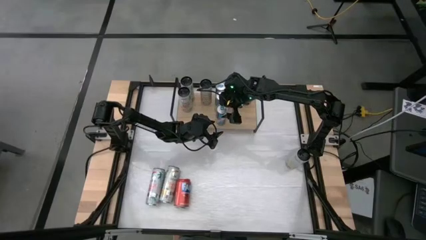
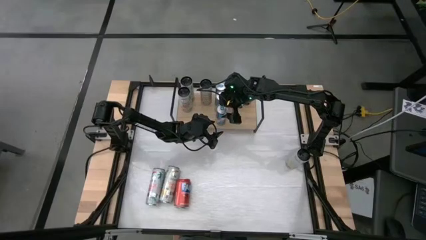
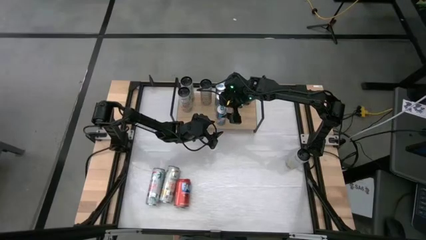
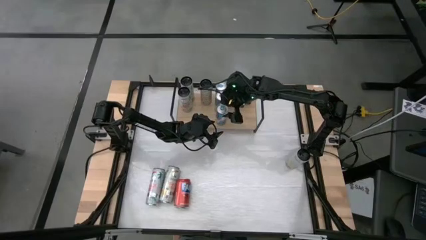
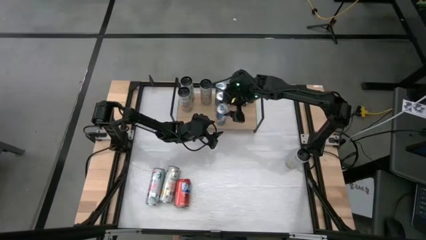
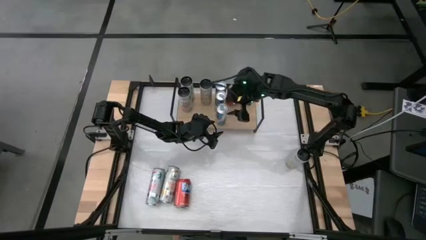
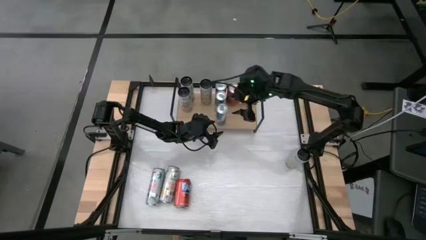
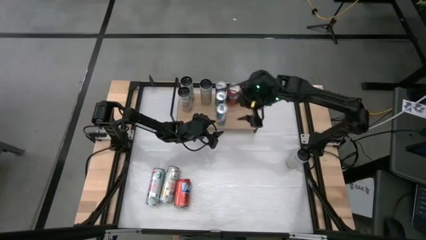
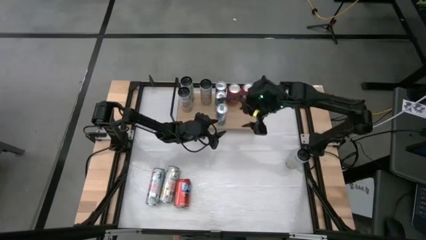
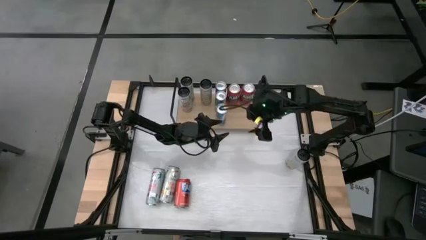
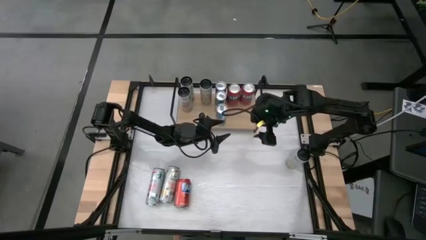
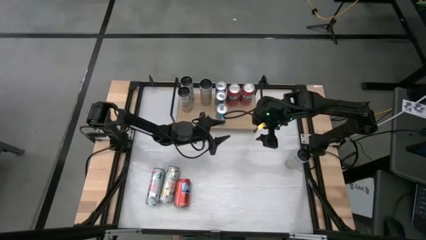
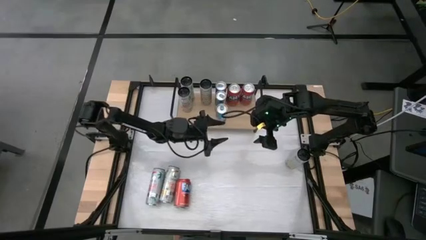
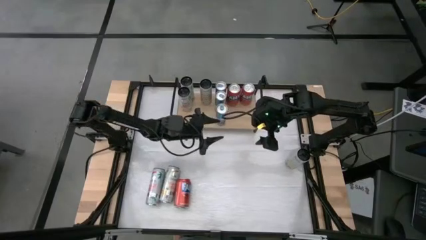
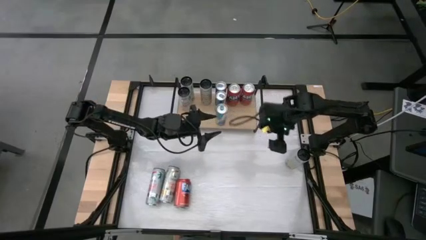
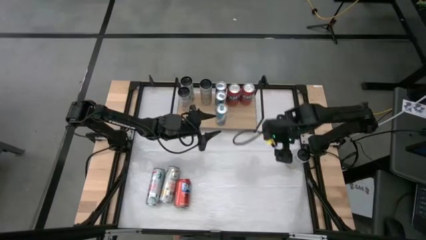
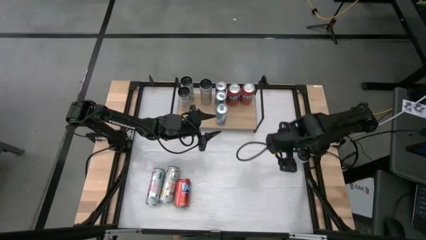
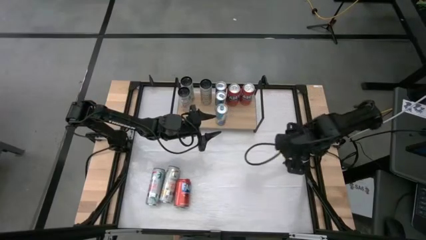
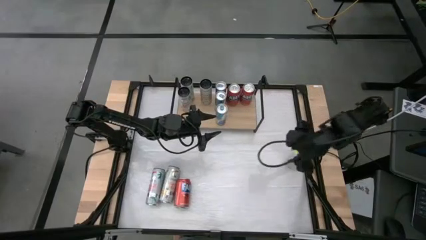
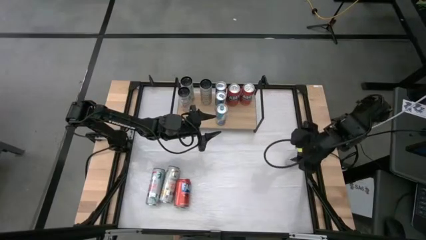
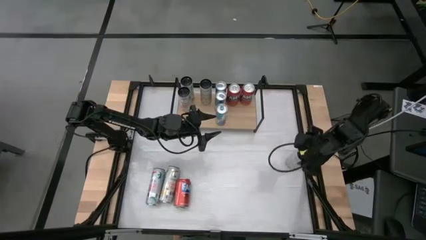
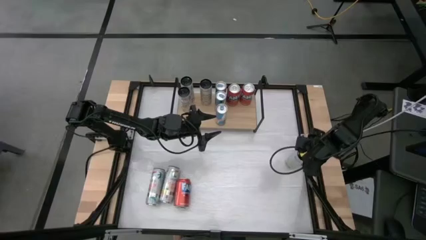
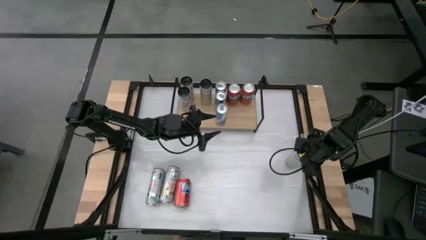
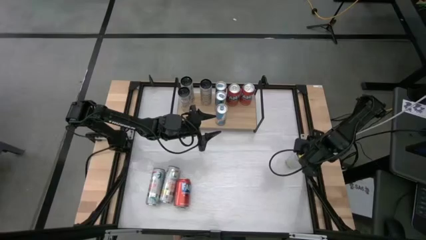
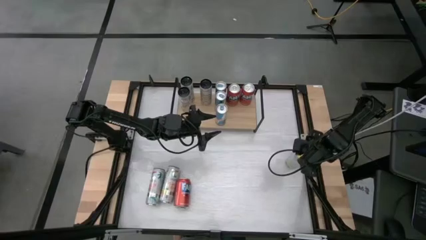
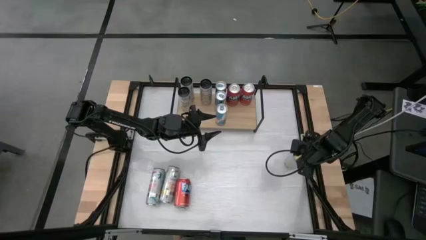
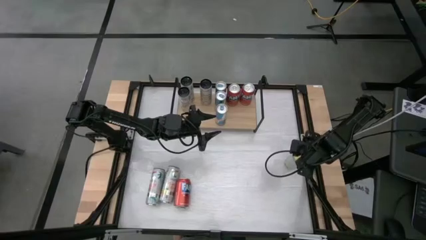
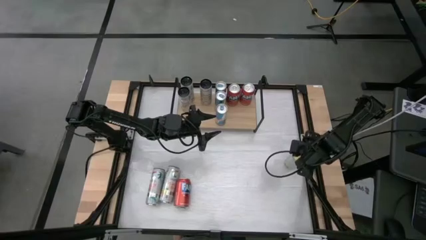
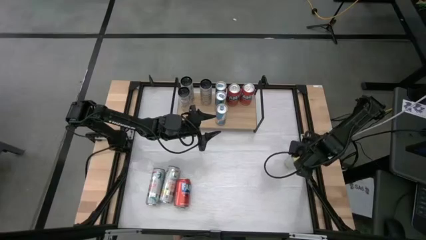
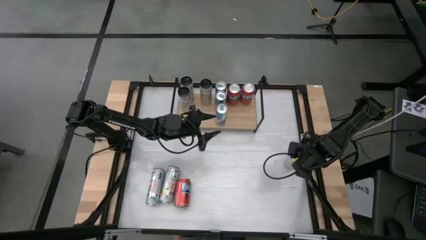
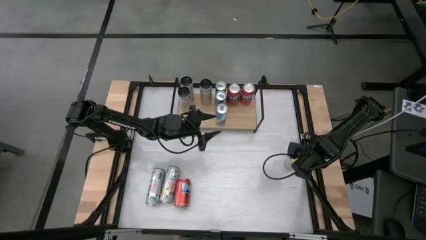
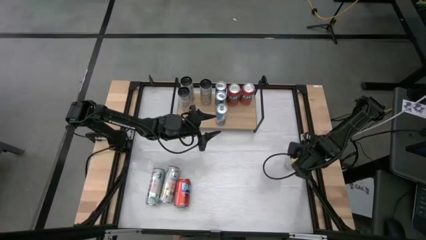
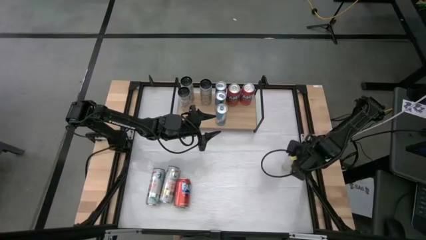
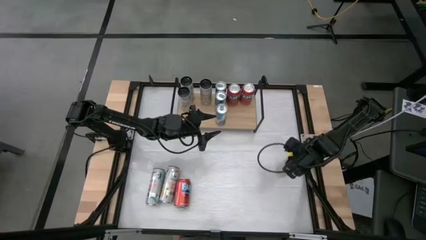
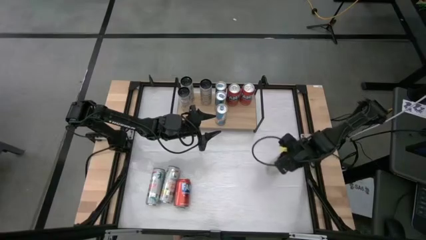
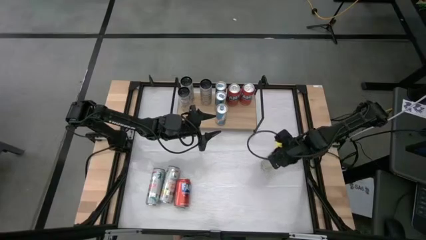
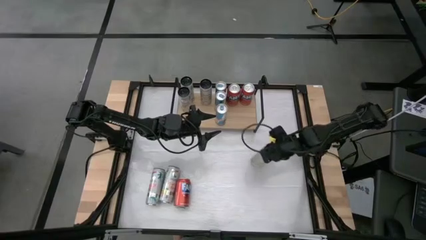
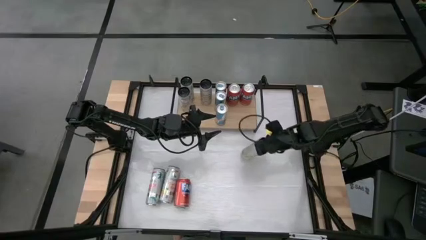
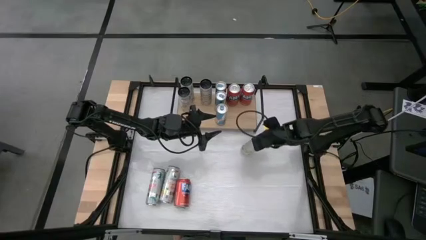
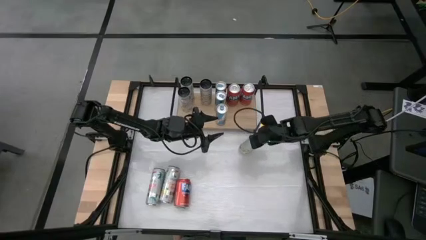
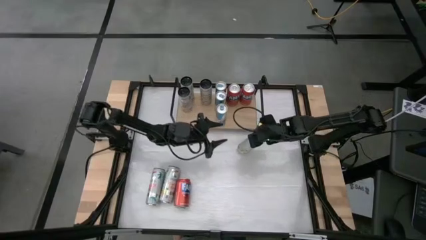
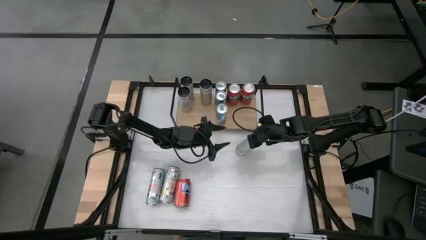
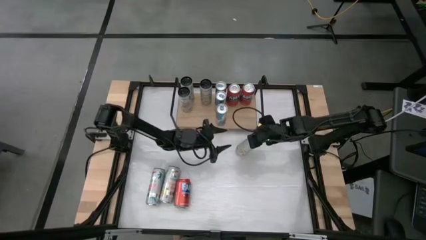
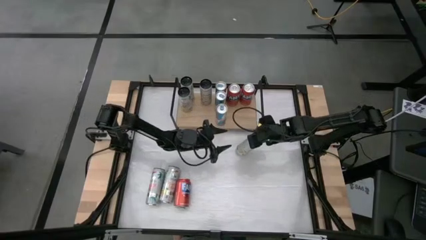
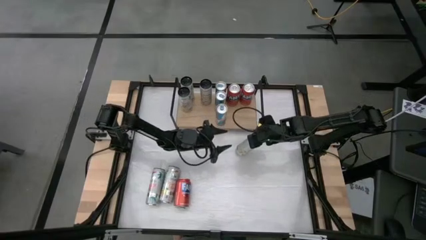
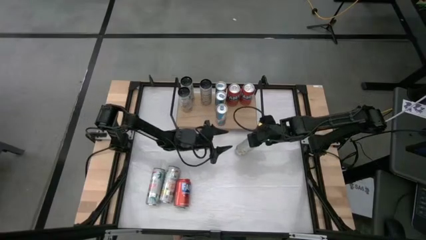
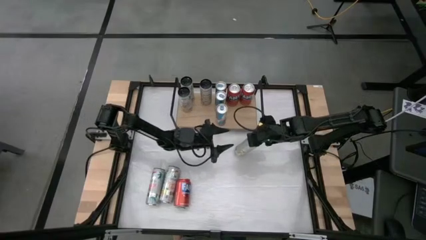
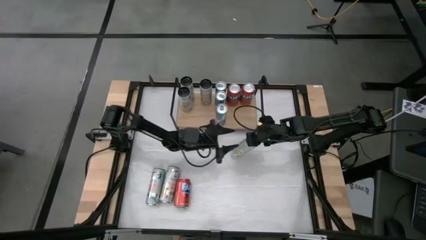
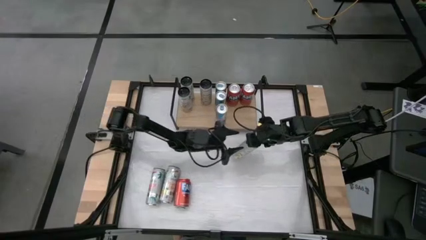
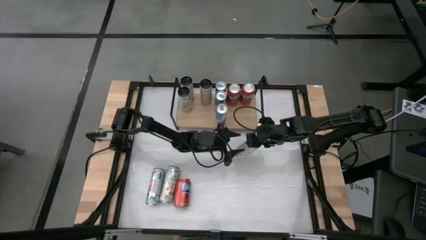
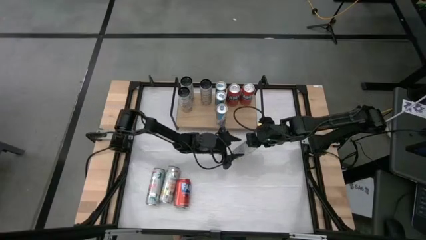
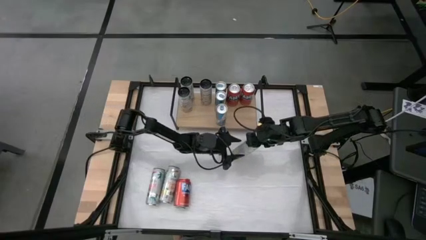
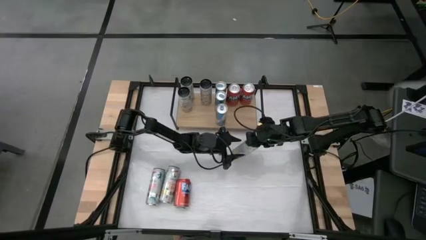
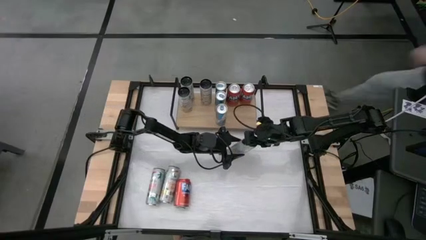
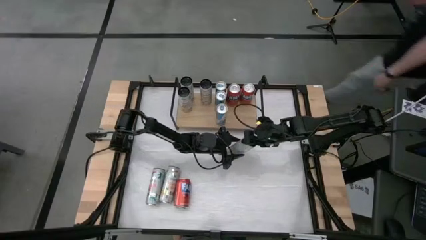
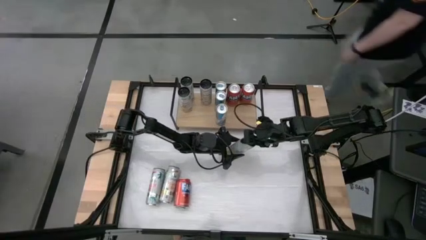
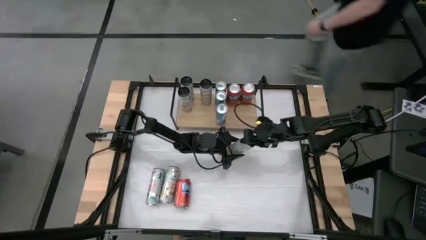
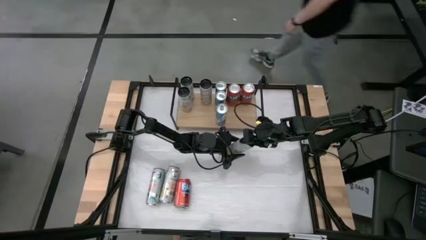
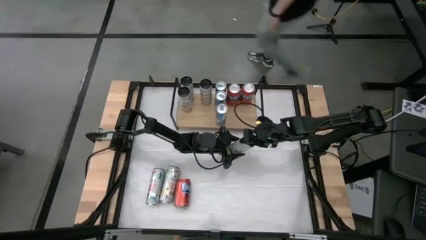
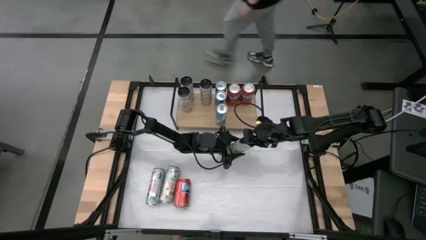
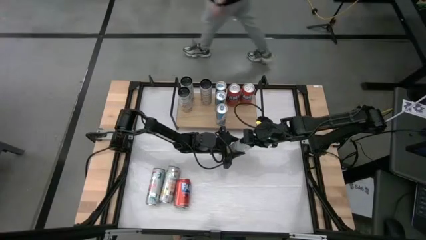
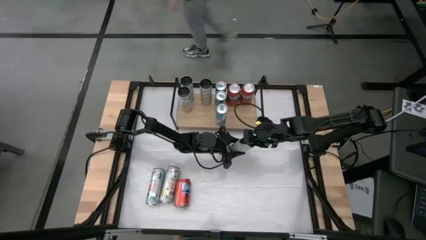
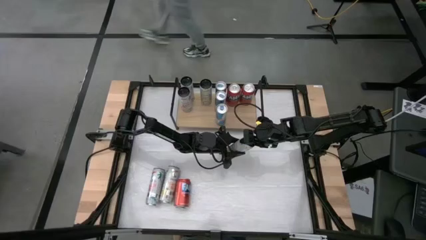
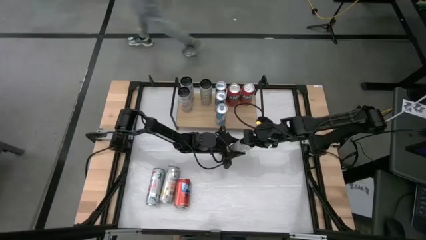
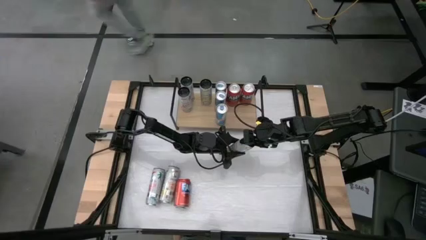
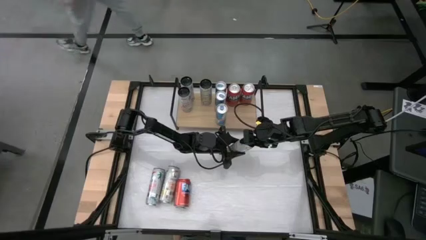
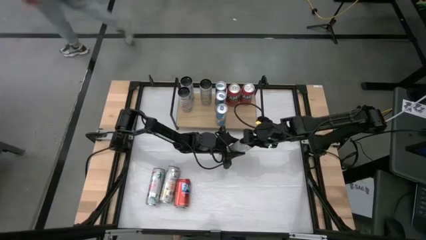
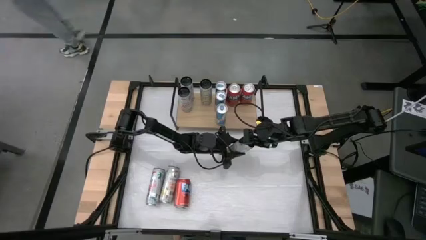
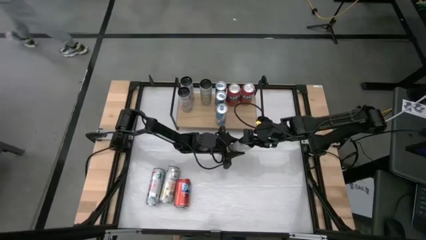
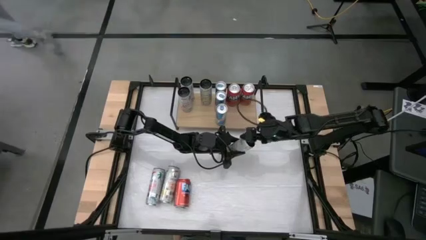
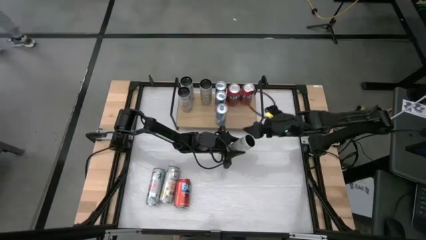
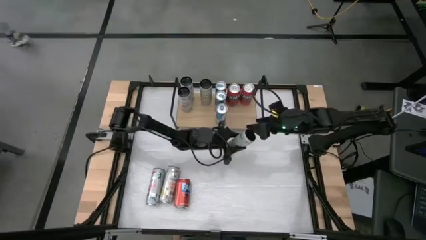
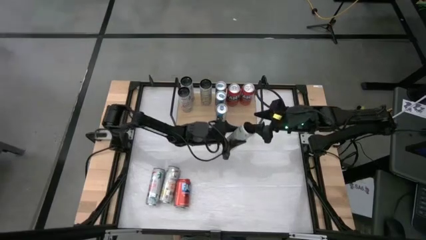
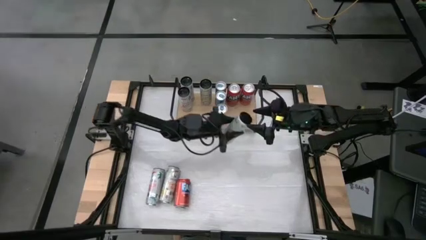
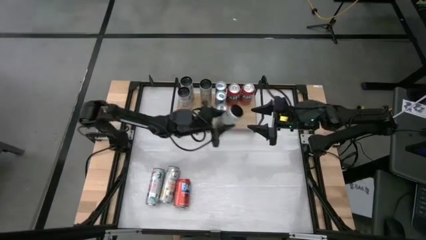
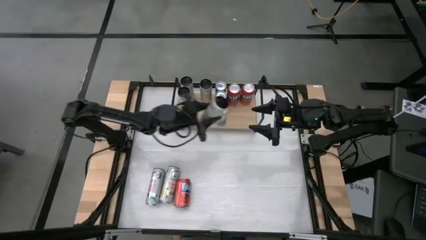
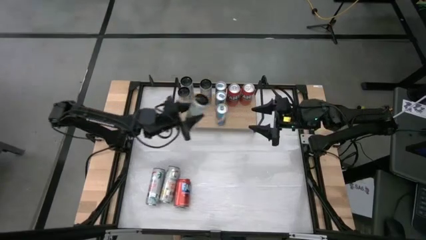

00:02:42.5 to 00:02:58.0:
Task: Place canned beverage on shelf
Put the top white yellow soda can on the shelf aligned with the other white yellow soda can
